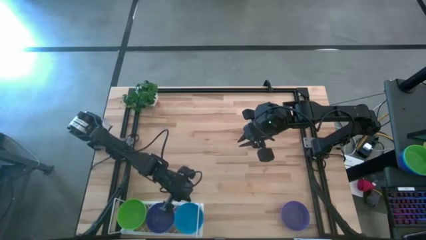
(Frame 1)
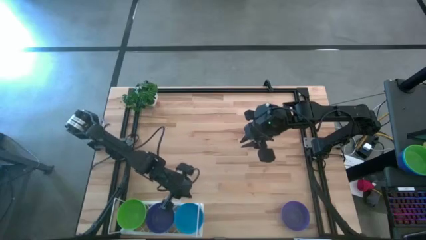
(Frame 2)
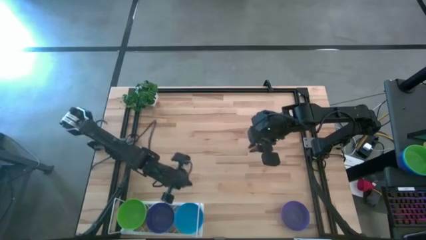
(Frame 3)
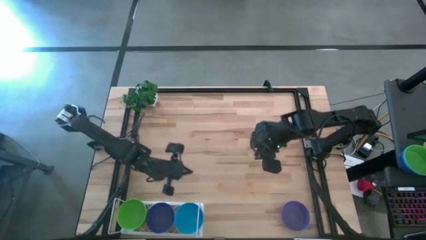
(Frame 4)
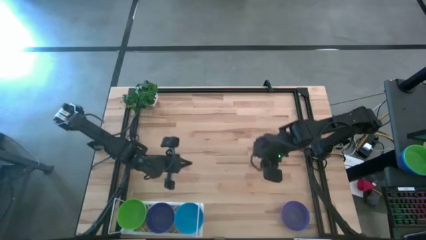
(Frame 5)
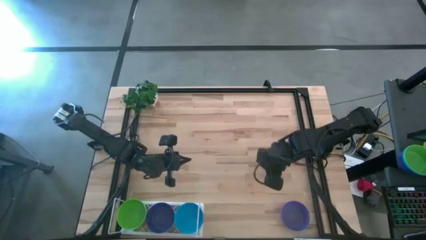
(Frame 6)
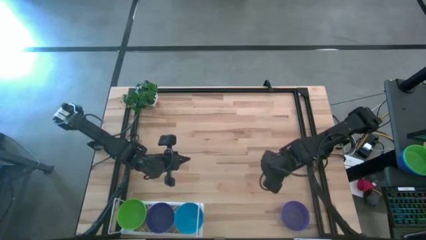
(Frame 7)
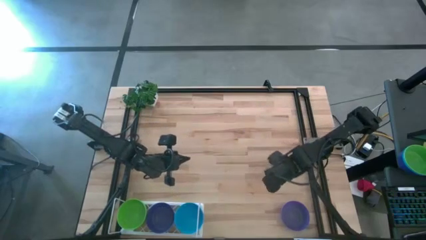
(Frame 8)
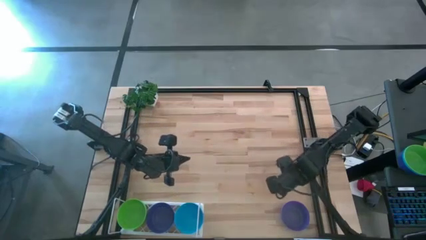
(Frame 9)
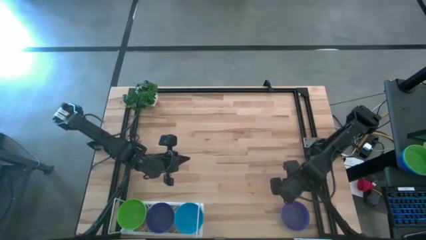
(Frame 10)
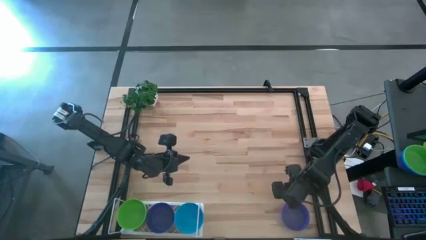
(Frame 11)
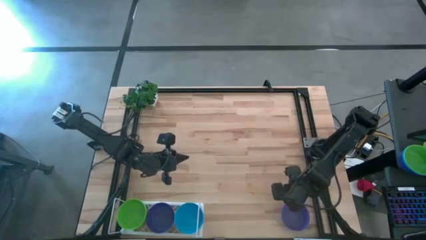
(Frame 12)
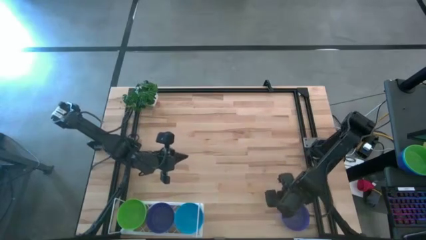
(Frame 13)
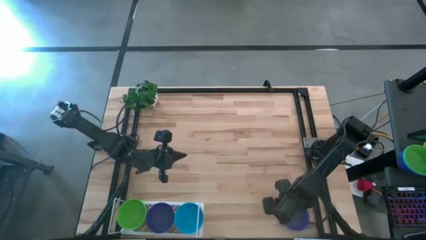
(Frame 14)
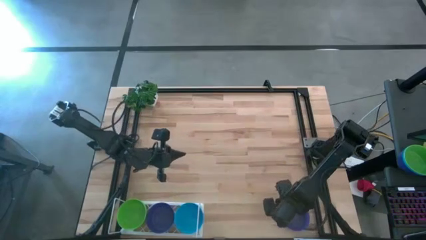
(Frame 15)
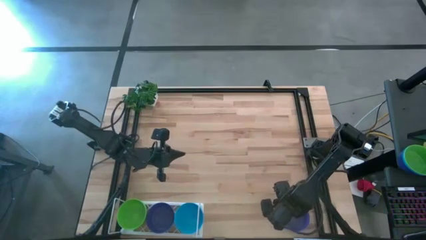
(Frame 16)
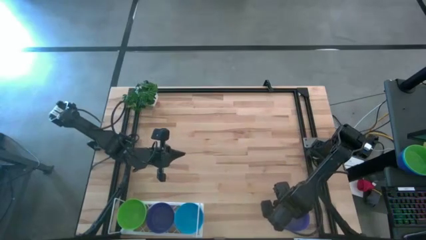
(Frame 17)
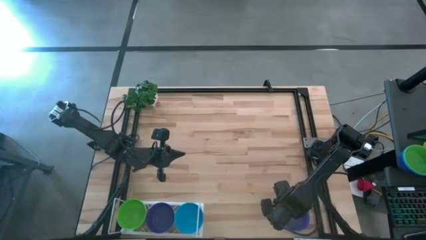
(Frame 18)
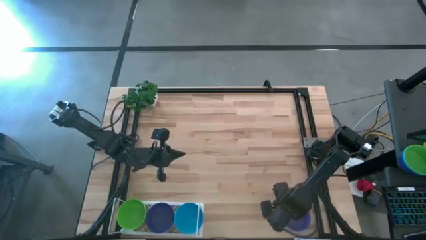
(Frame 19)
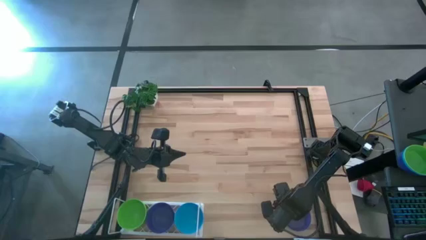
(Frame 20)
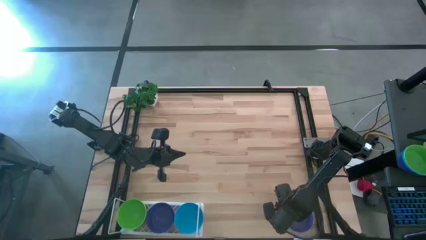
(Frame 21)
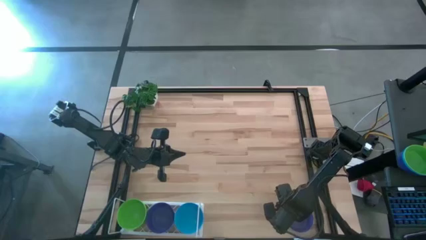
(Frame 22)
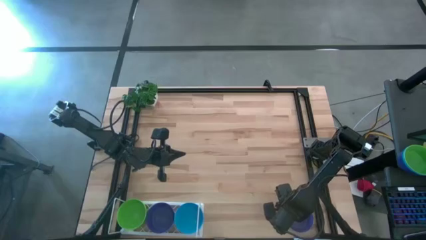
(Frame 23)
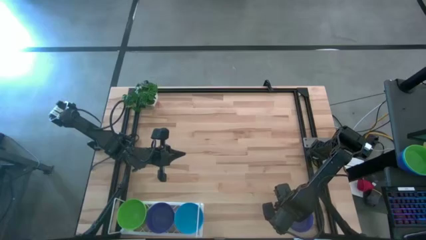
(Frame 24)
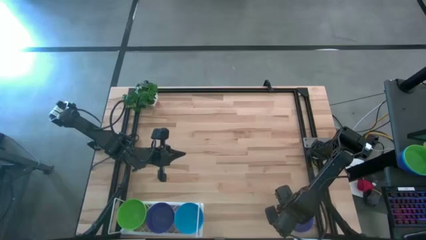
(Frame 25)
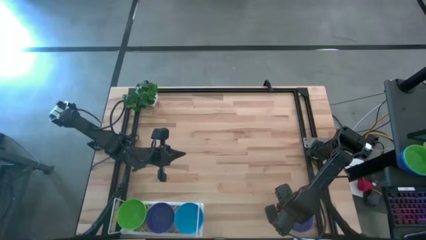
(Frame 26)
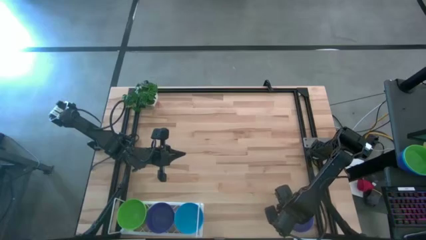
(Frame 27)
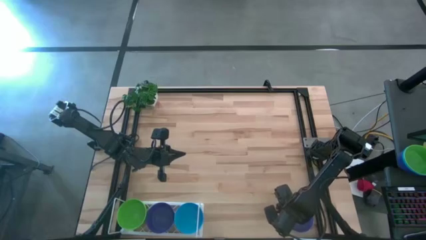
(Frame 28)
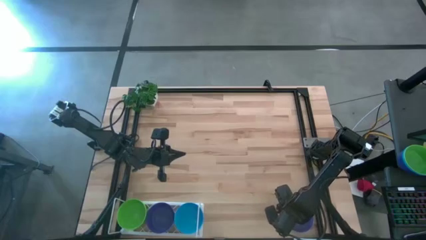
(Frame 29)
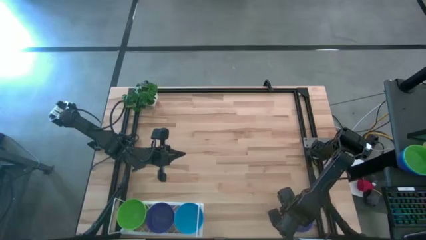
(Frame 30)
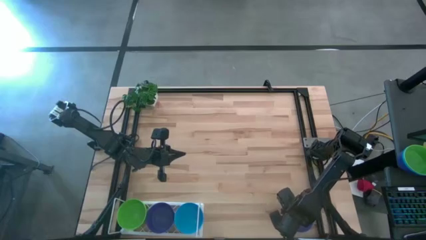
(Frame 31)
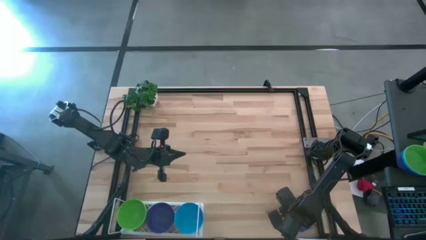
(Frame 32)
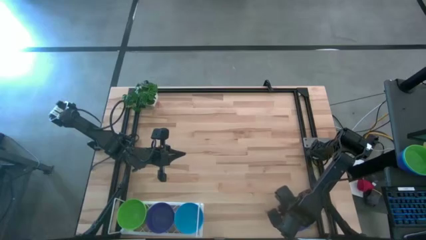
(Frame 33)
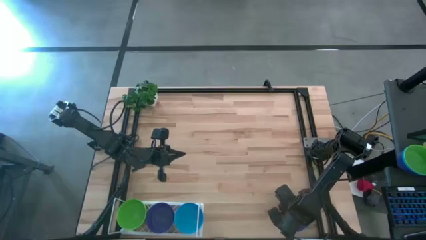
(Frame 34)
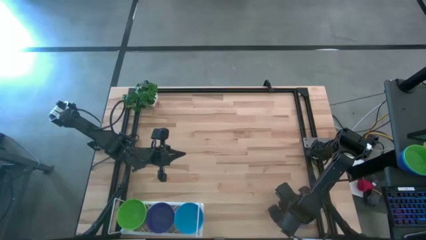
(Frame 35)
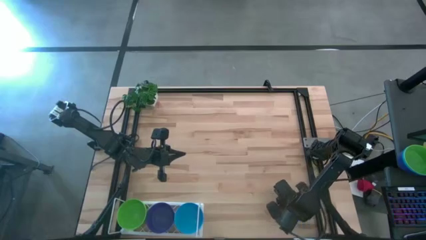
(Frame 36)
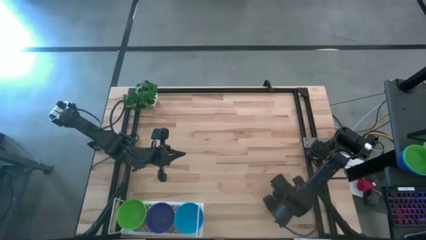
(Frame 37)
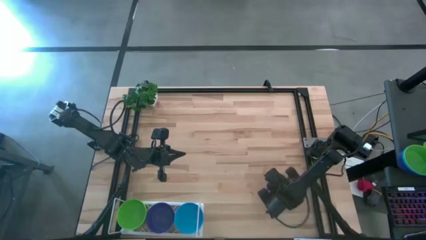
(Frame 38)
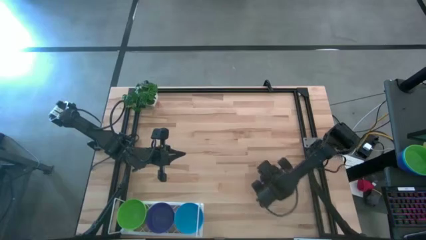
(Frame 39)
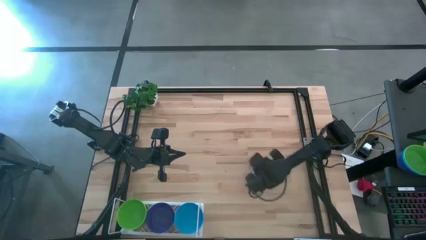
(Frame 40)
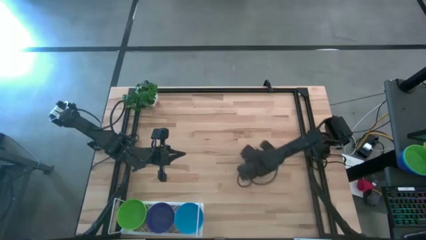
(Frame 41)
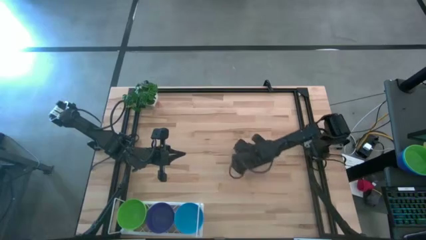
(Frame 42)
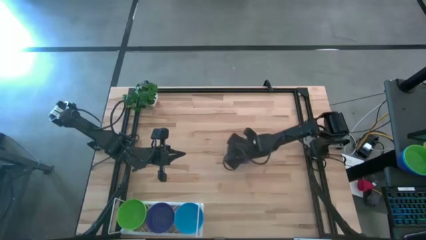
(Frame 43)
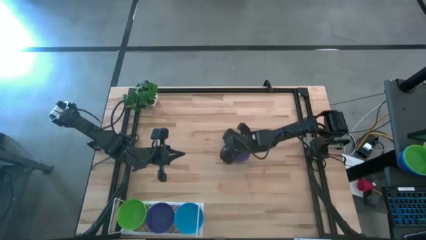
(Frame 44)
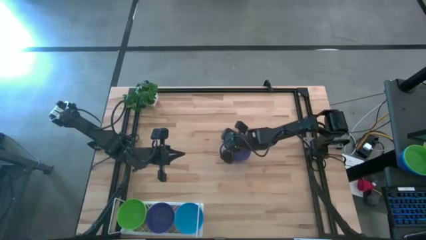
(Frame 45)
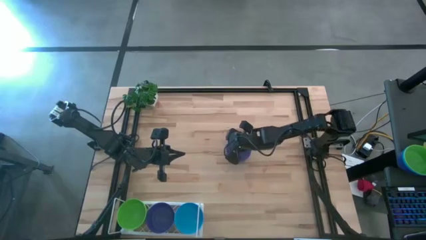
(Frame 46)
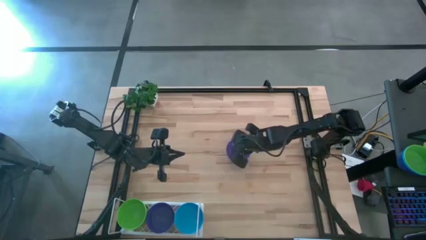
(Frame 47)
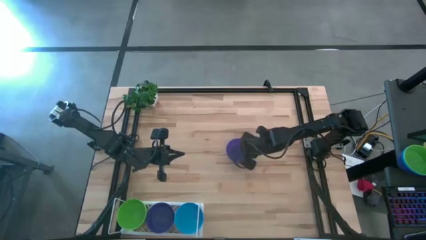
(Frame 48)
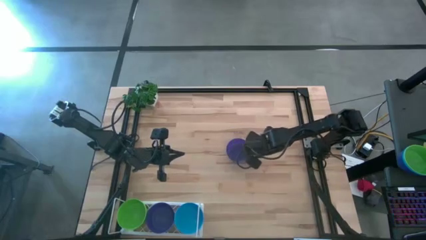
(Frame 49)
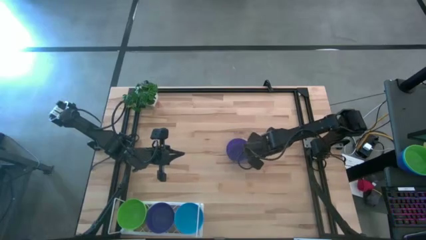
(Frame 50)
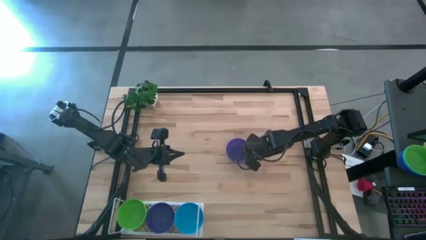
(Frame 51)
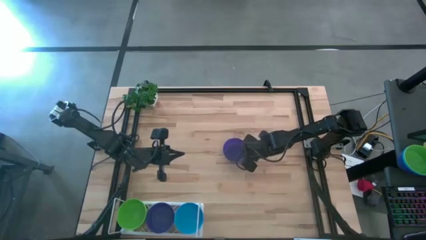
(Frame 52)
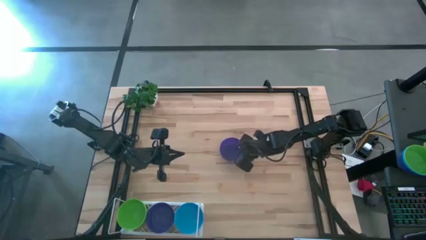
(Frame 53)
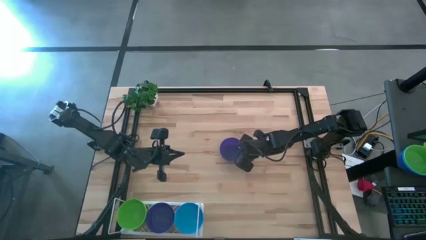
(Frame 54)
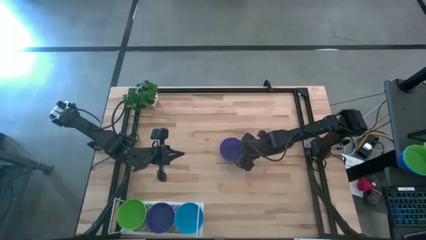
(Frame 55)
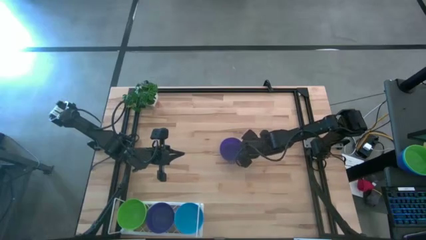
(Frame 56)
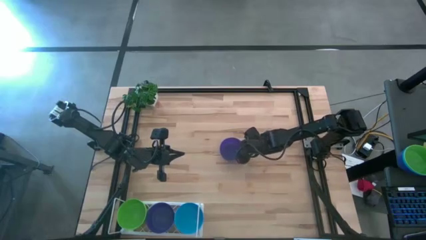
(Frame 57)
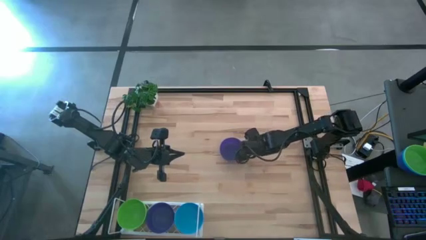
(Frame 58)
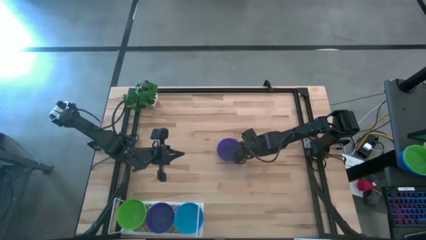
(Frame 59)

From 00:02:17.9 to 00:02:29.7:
Task: Pick & Place Mini bowls
Stack the purple bowl on the purple bowl on the shelf
